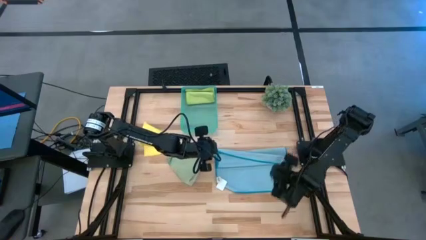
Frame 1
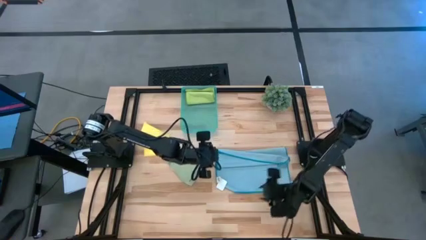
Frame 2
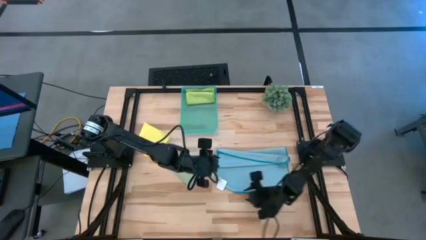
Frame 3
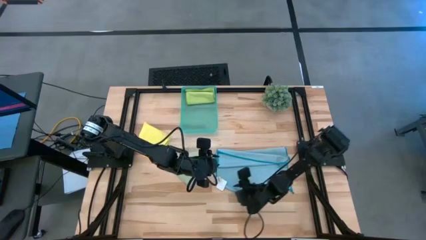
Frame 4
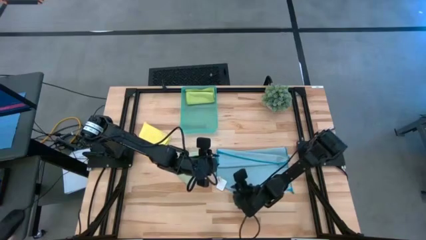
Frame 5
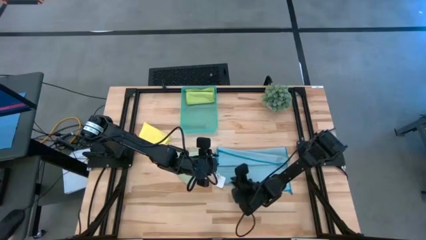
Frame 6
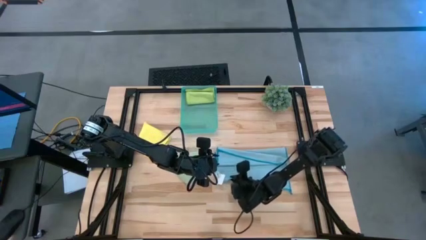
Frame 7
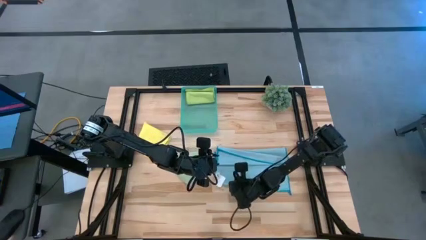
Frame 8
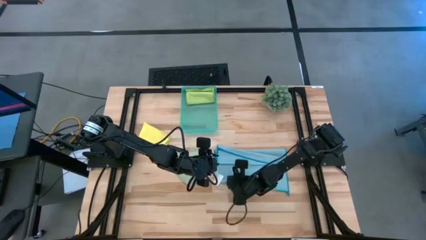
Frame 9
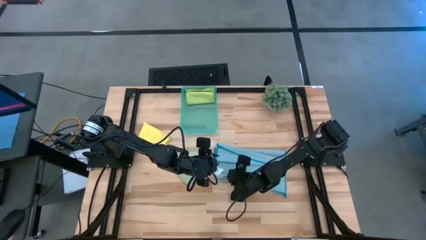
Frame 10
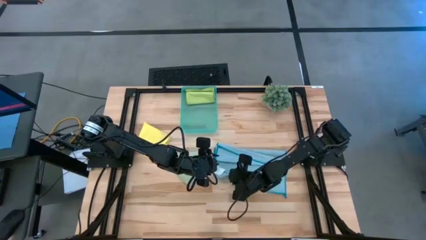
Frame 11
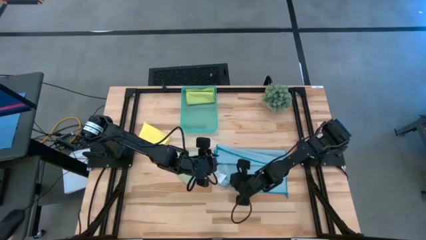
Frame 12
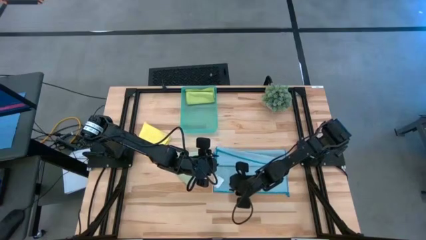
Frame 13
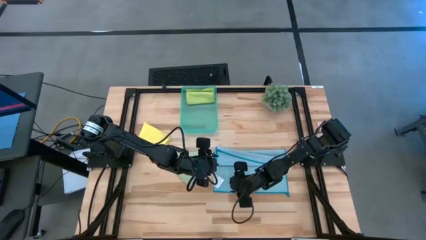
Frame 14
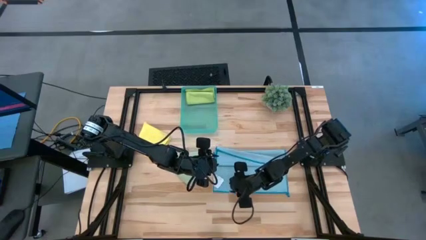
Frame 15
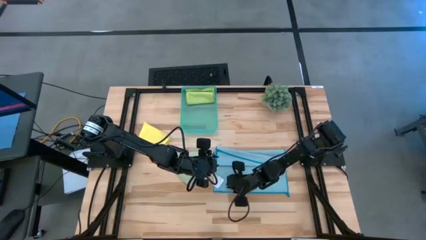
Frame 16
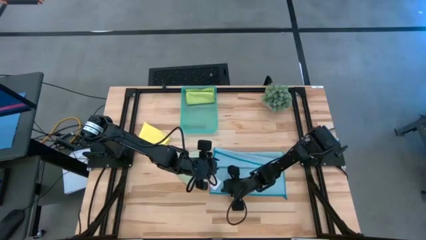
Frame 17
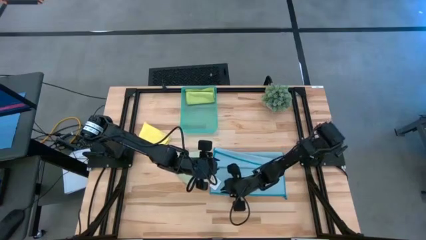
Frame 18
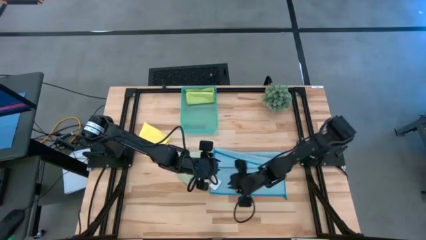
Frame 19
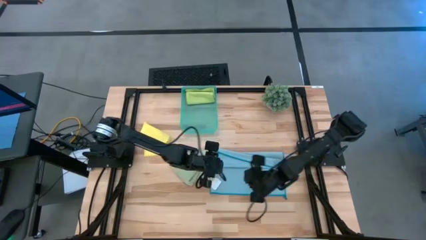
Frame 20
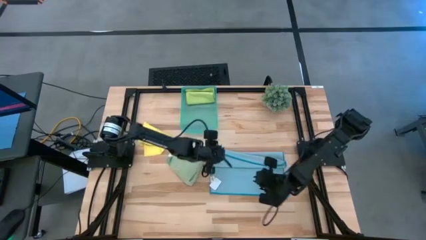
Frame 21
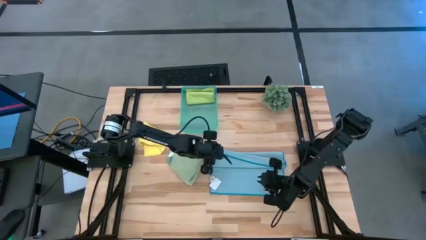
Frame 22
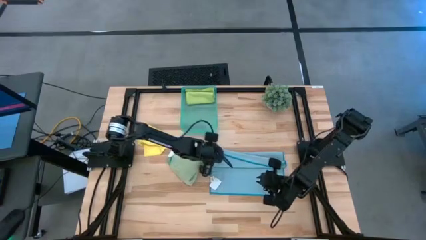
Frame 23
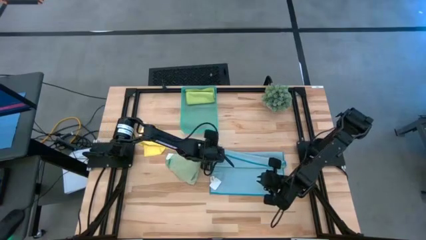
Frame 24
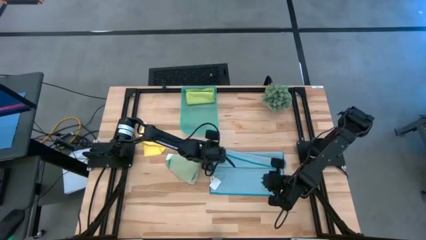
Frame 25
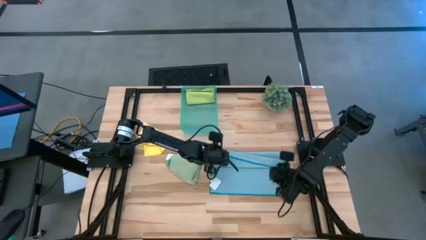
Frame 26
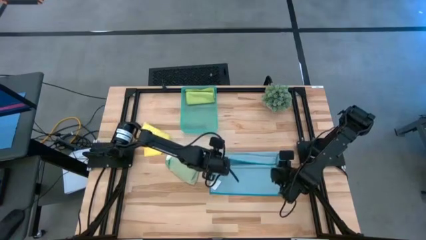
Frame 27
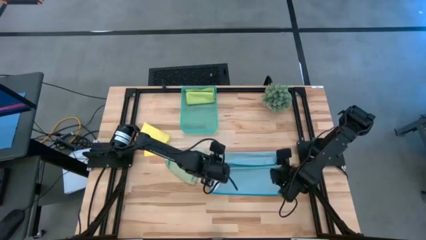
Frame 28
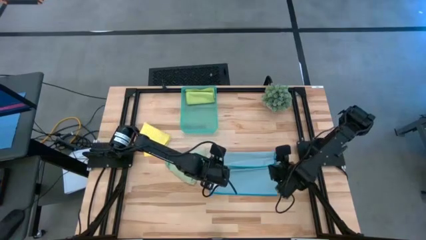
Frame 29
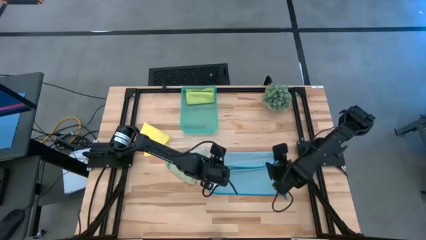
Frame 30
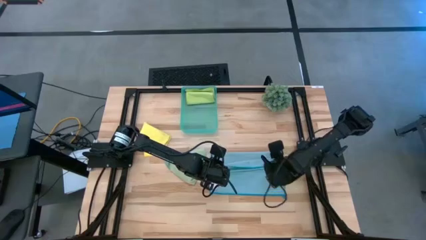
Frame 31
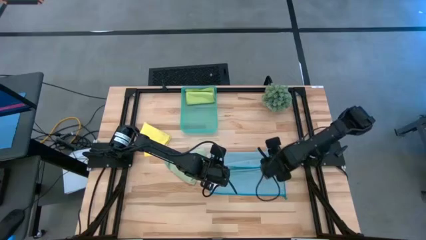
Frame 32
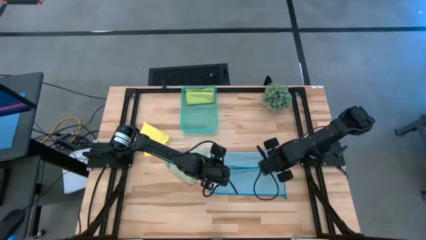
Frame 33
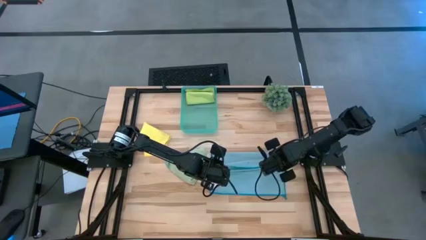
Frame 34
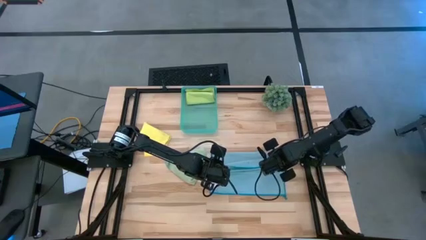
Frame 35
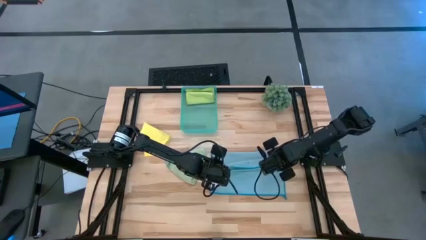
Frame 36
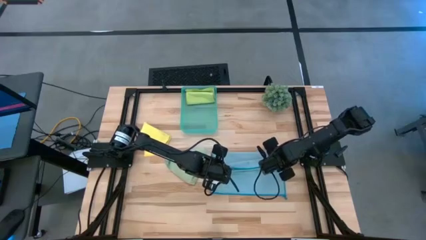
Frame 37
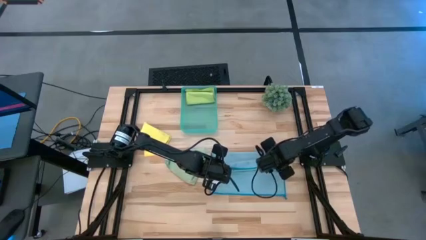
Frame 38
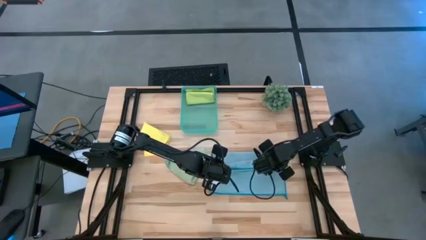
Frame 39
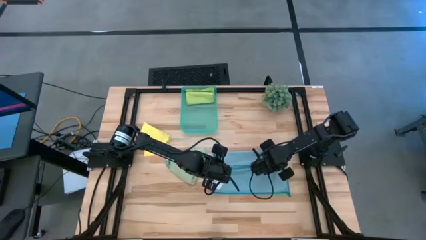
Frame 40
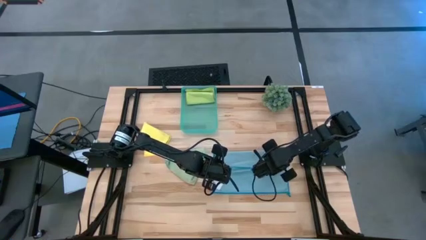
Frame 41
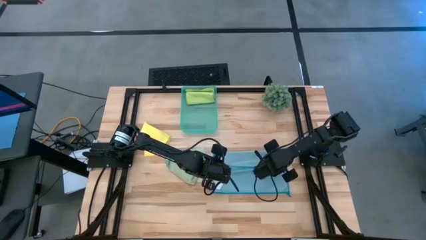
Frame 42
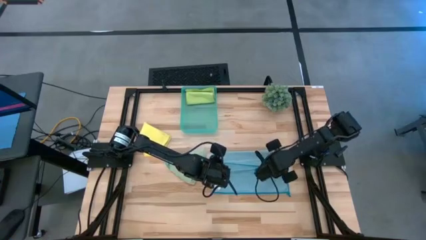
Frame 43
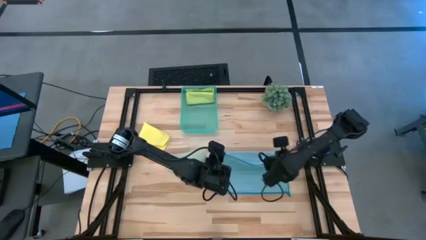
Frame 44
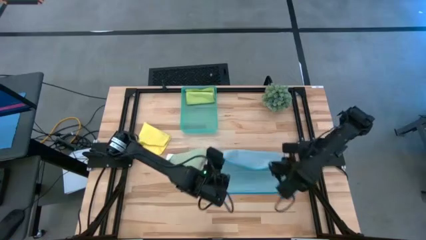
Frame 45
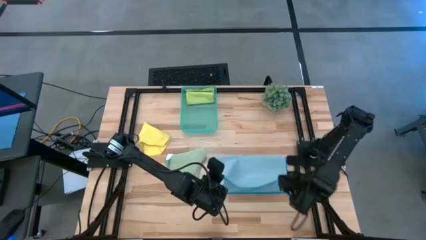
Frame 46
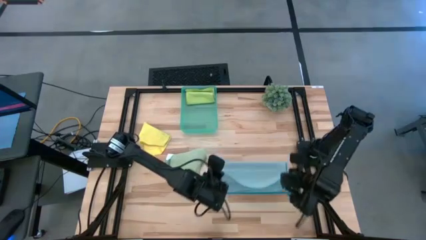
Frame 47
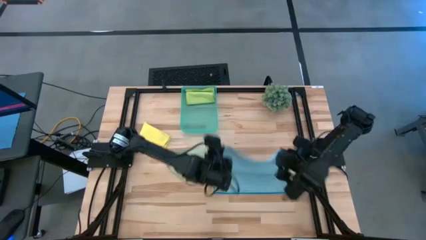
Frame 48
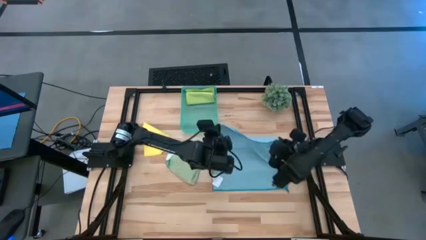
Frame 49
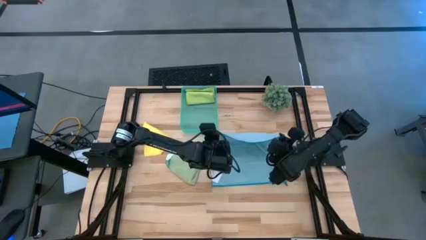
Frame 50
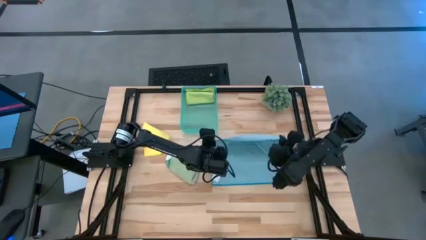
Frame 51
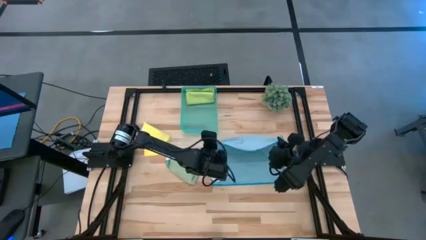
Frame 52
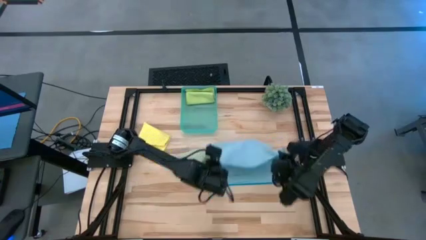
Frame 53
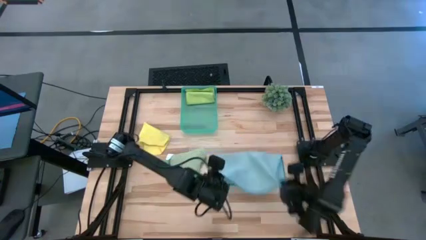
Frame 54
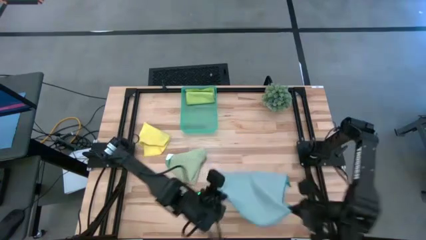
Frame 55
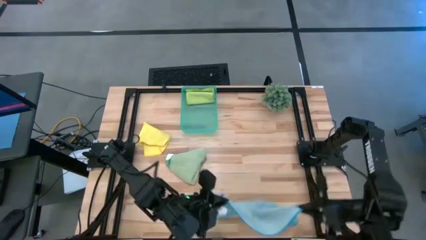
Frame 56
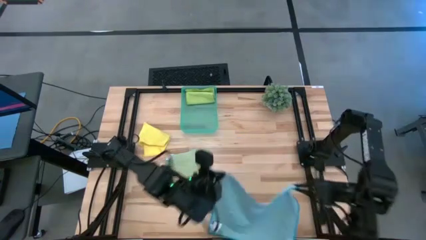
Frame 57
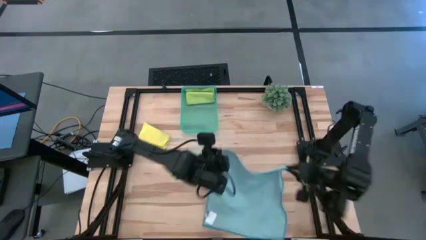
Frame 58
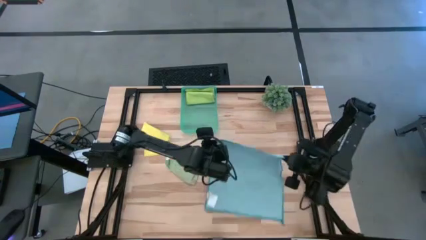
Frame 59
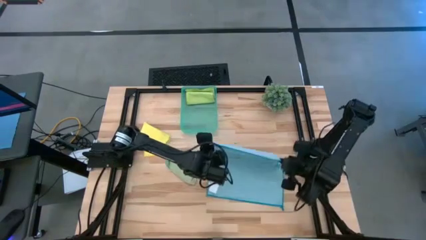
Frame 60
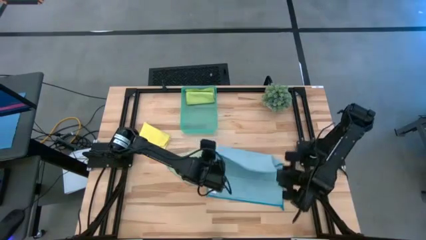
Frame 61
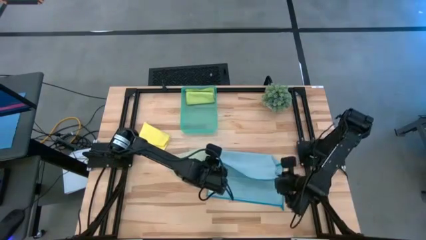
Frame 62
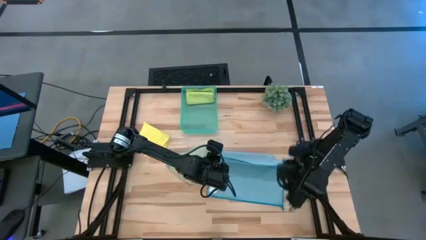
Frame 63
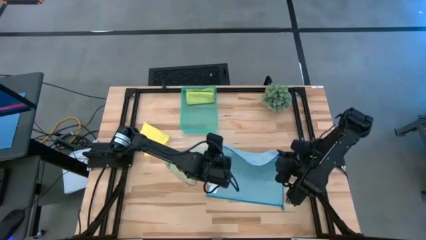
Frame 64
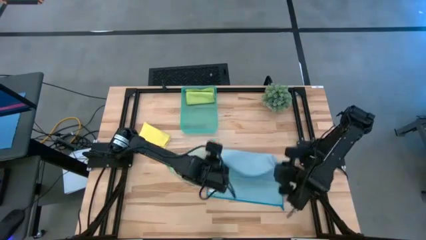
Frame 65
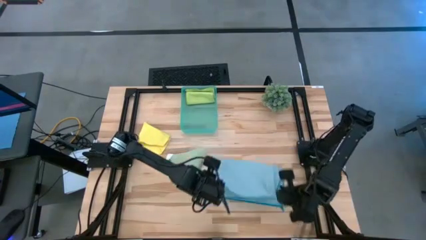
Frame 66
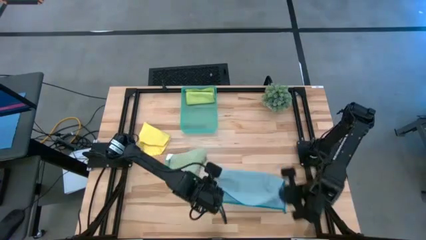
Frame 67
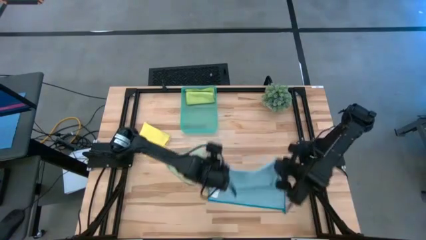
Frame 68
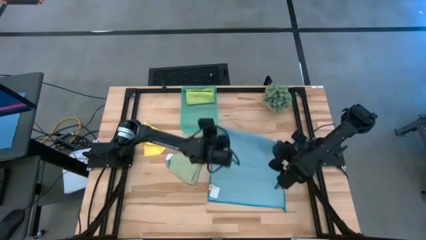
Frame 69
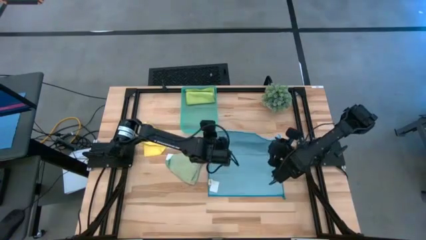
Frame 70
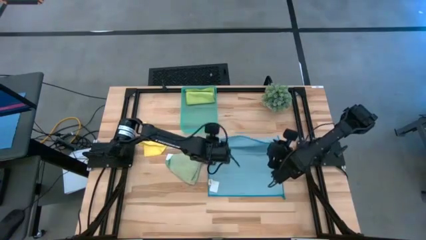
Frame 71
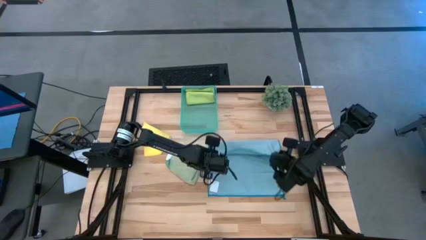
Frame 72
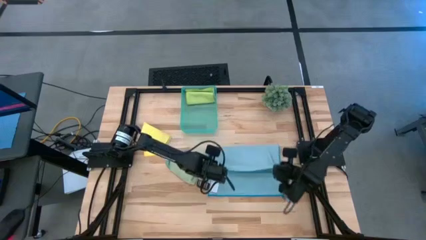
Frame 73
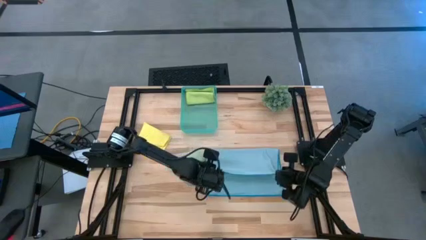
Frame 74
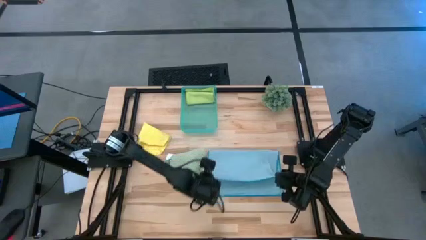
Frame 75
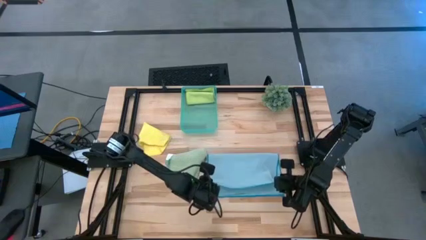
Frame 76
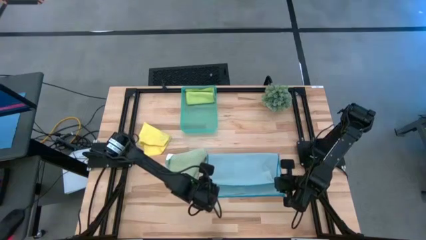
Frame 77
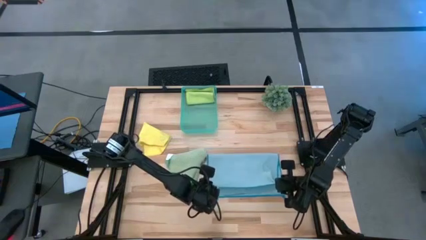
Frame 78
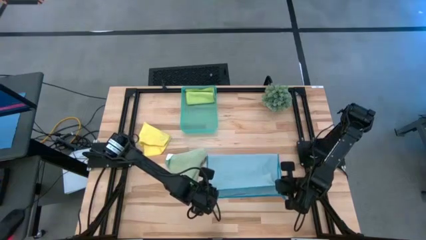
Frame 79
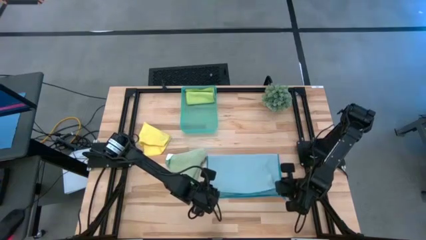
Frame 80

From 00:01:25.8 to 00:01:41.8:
Task: Fold microfiber towels
Fold the blue microfiber cloth
